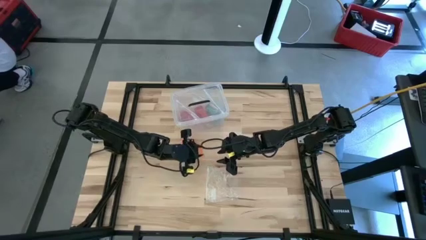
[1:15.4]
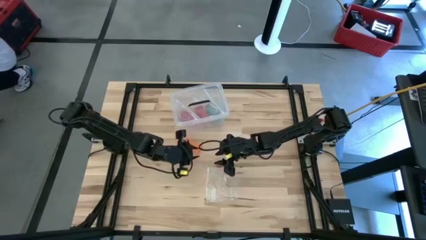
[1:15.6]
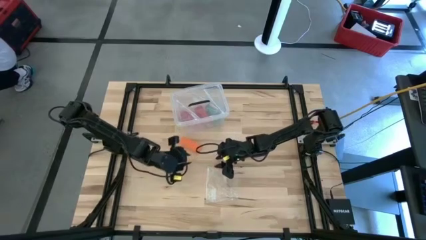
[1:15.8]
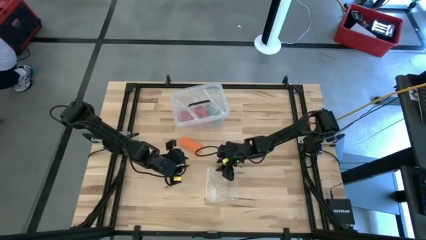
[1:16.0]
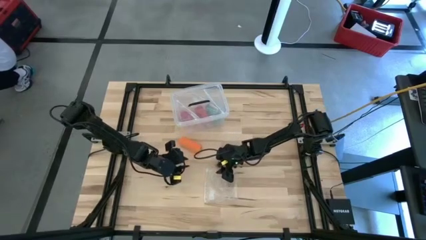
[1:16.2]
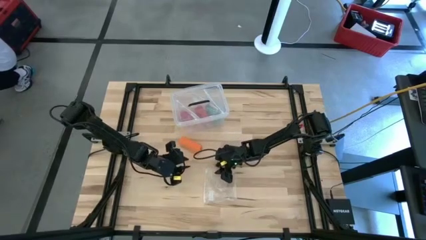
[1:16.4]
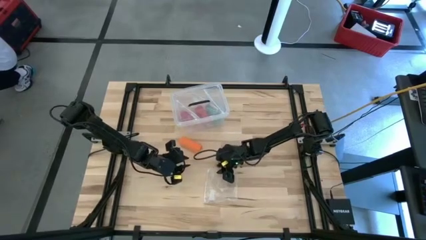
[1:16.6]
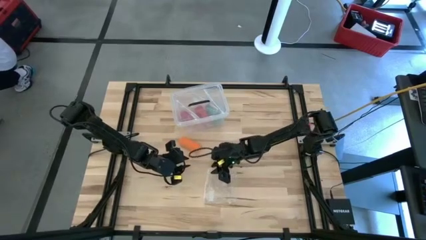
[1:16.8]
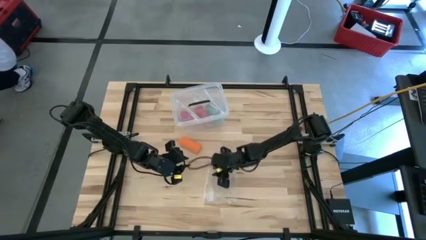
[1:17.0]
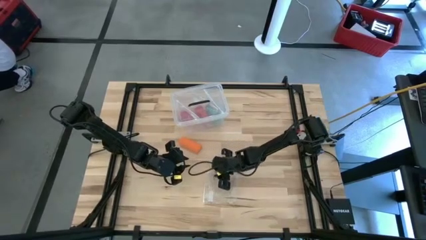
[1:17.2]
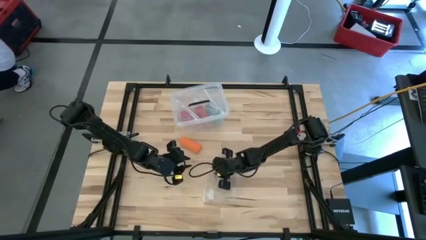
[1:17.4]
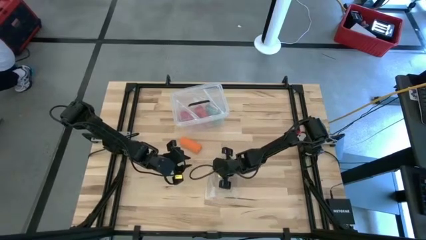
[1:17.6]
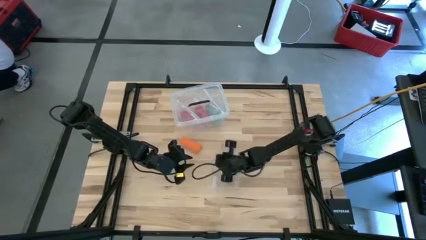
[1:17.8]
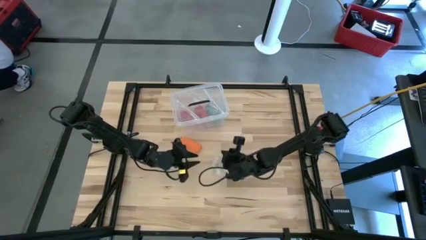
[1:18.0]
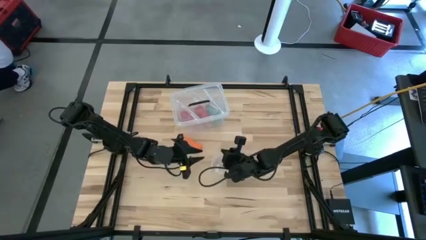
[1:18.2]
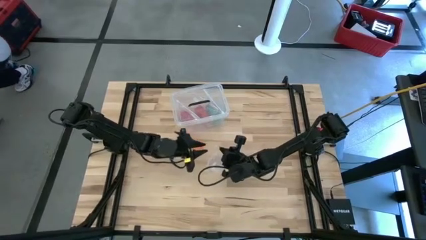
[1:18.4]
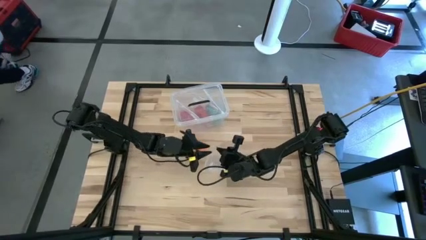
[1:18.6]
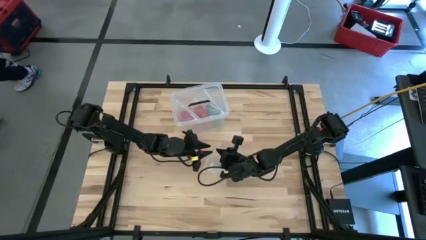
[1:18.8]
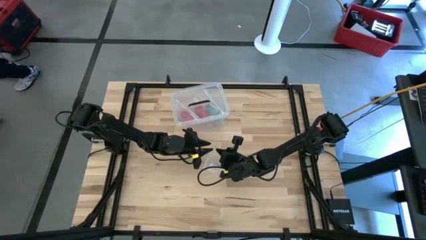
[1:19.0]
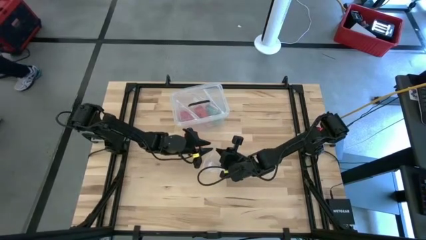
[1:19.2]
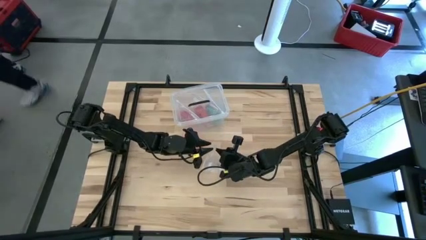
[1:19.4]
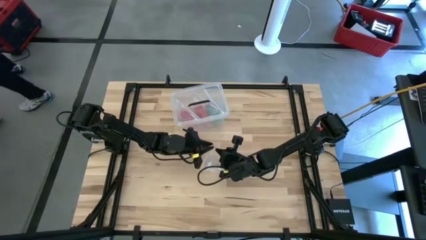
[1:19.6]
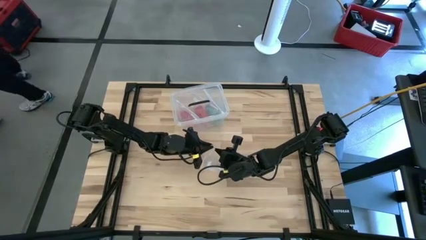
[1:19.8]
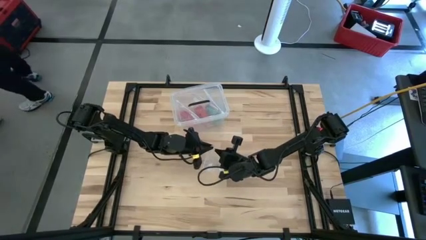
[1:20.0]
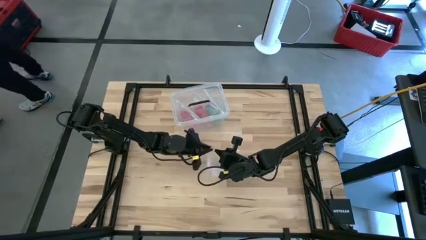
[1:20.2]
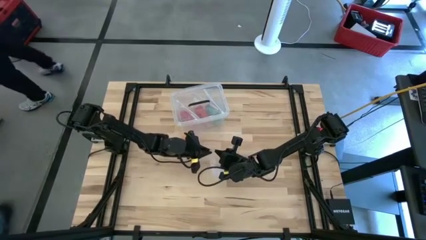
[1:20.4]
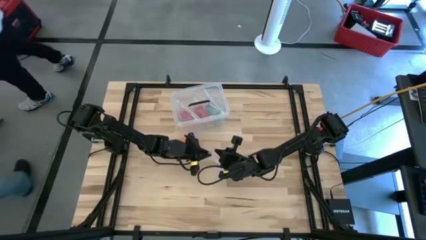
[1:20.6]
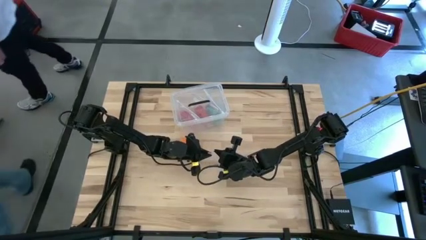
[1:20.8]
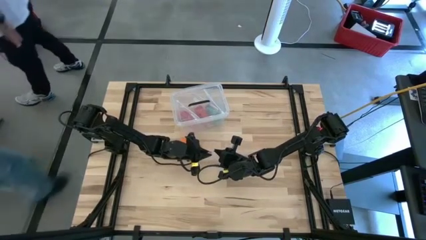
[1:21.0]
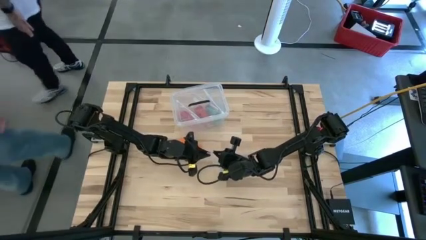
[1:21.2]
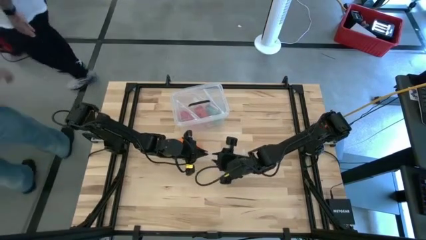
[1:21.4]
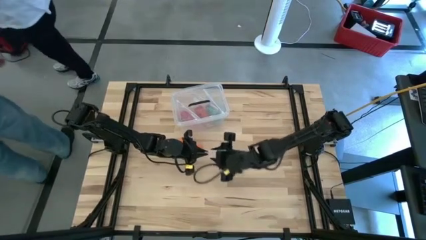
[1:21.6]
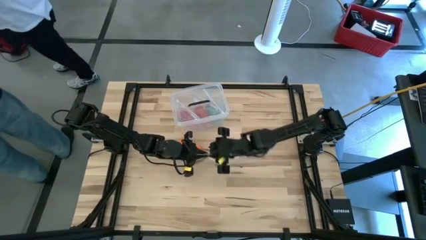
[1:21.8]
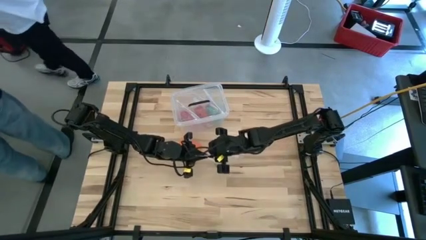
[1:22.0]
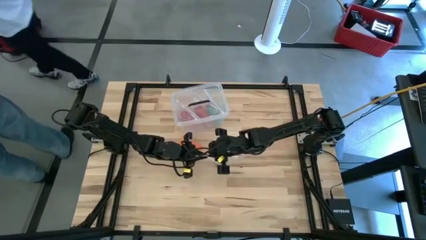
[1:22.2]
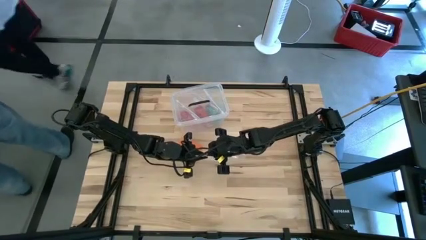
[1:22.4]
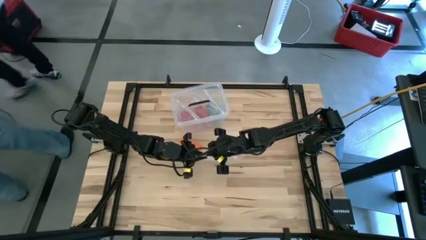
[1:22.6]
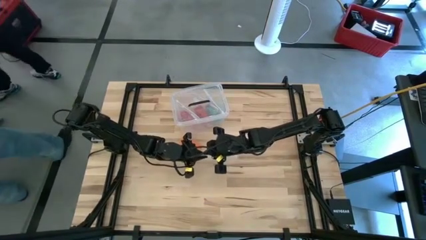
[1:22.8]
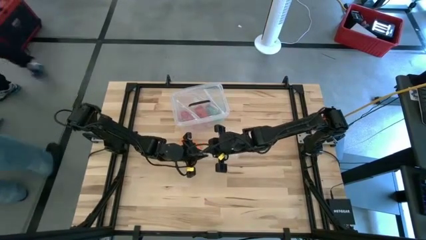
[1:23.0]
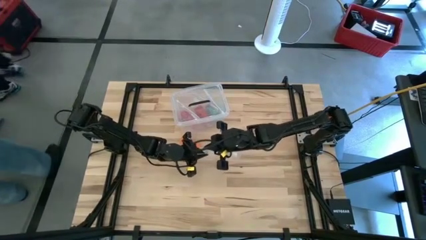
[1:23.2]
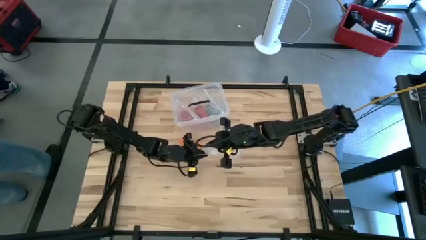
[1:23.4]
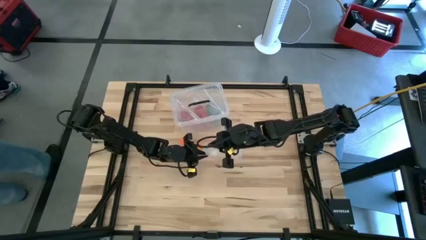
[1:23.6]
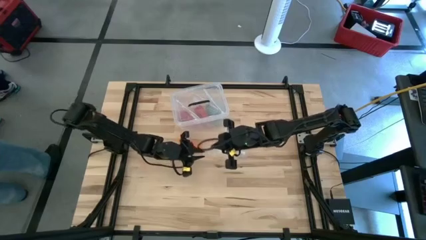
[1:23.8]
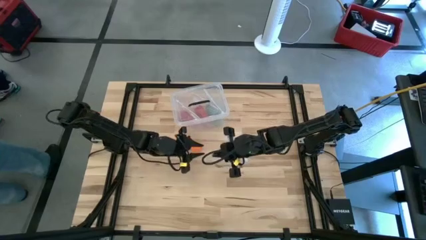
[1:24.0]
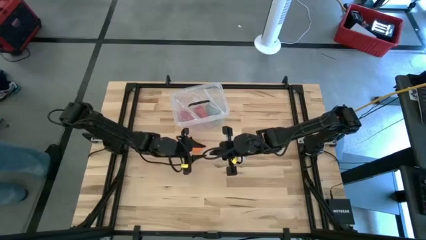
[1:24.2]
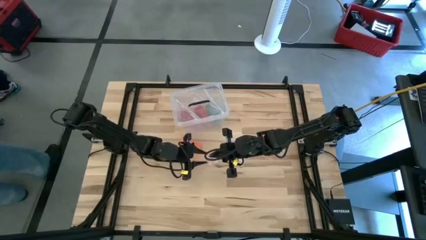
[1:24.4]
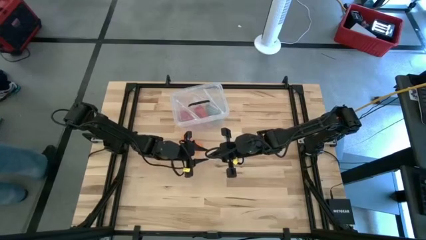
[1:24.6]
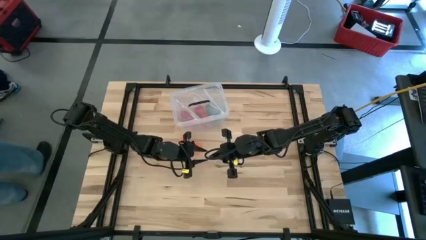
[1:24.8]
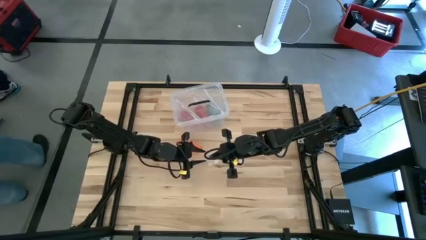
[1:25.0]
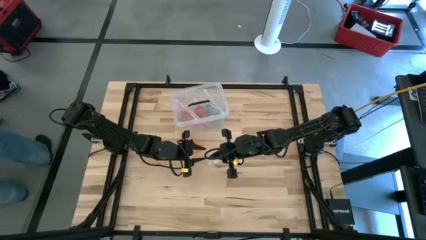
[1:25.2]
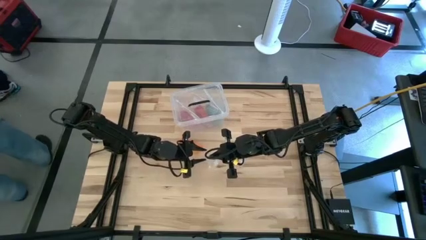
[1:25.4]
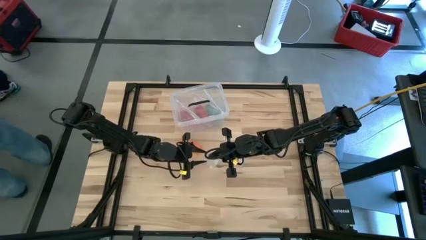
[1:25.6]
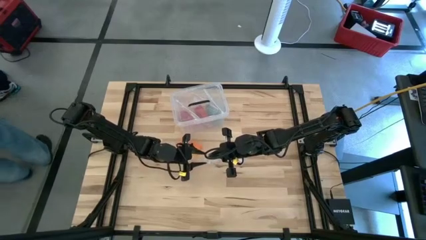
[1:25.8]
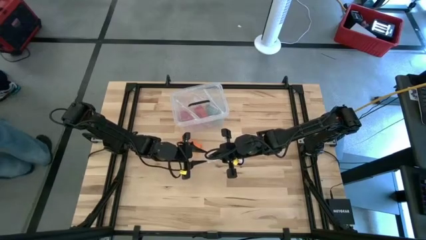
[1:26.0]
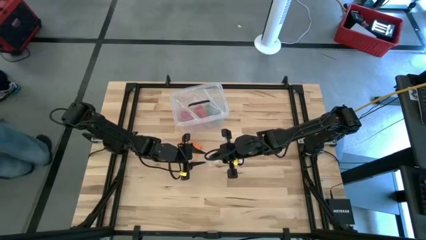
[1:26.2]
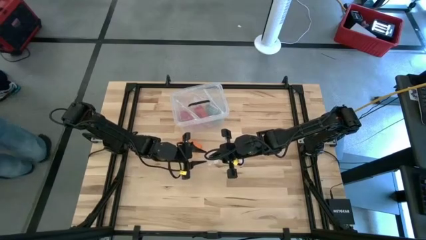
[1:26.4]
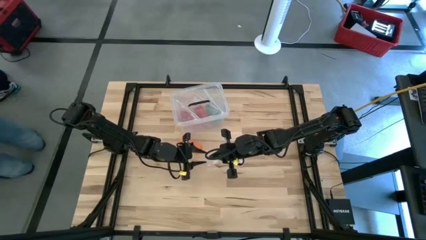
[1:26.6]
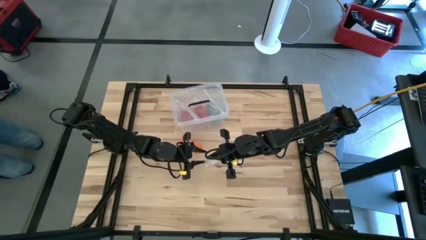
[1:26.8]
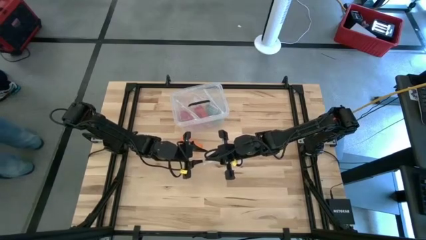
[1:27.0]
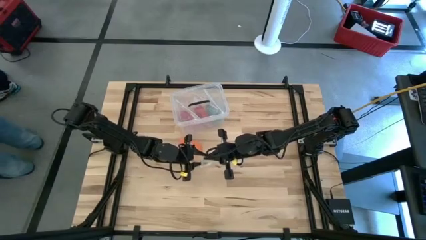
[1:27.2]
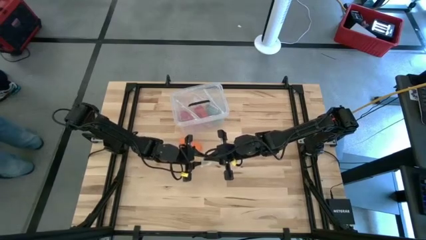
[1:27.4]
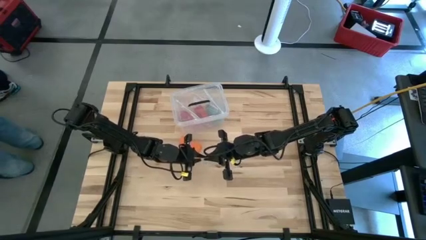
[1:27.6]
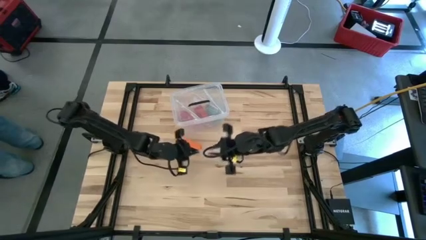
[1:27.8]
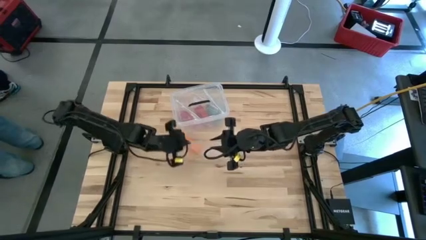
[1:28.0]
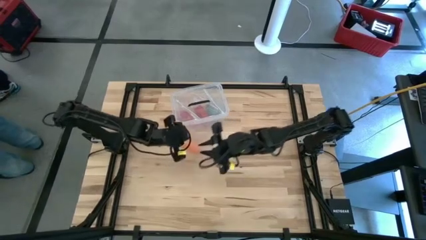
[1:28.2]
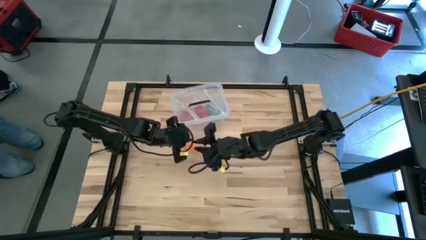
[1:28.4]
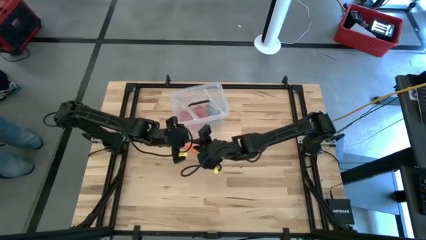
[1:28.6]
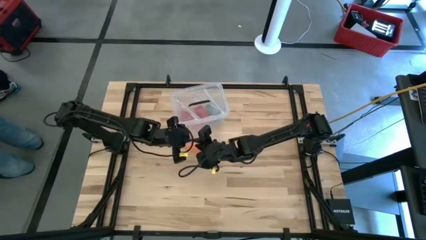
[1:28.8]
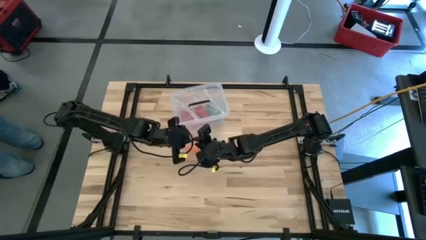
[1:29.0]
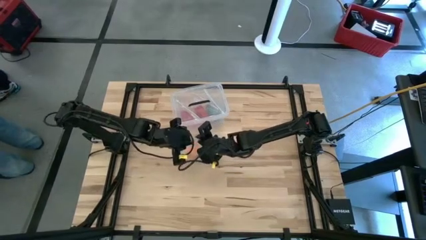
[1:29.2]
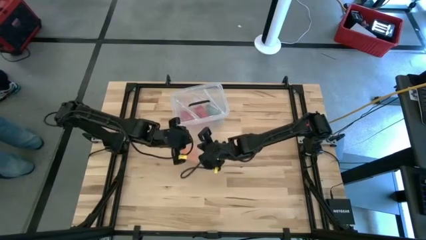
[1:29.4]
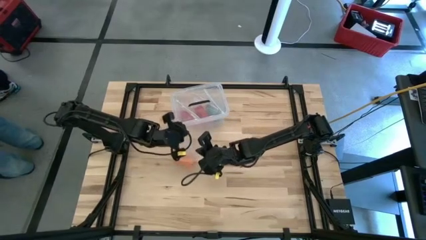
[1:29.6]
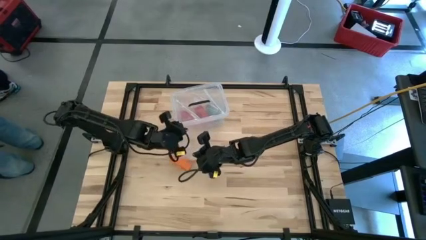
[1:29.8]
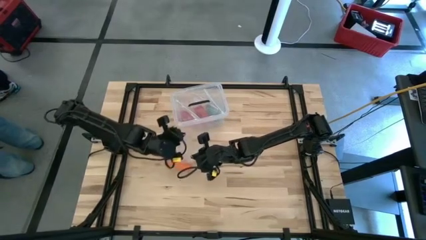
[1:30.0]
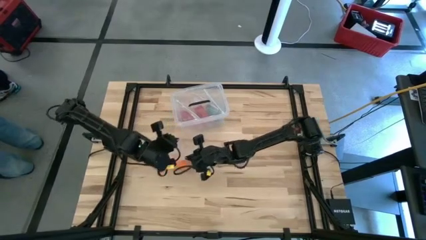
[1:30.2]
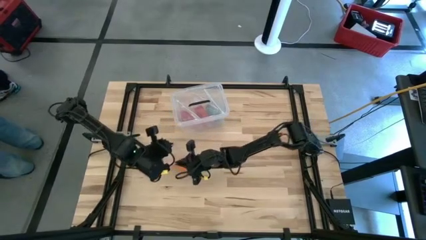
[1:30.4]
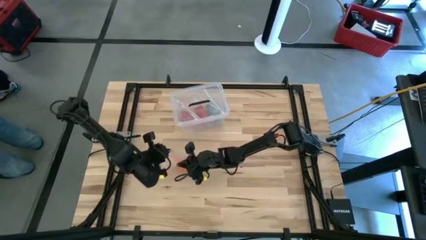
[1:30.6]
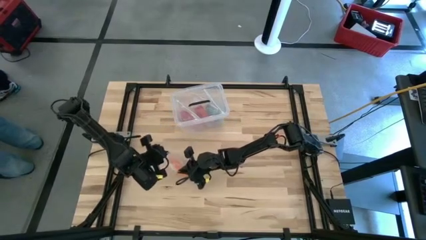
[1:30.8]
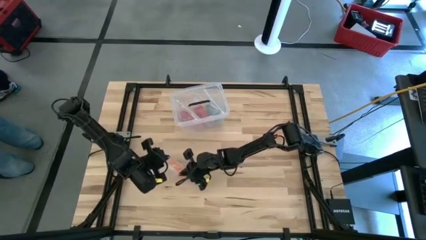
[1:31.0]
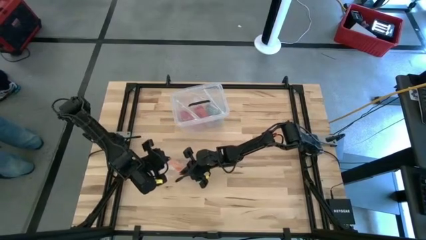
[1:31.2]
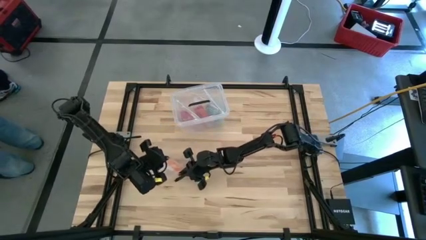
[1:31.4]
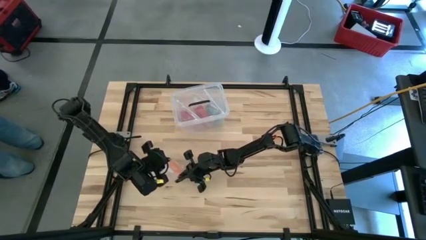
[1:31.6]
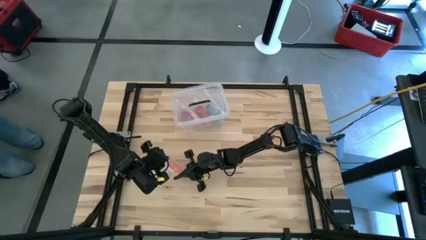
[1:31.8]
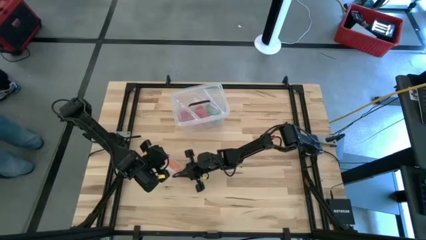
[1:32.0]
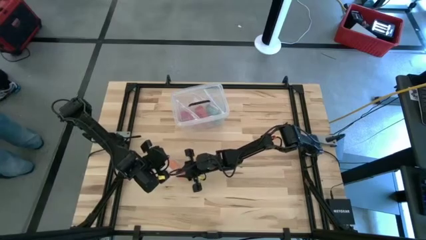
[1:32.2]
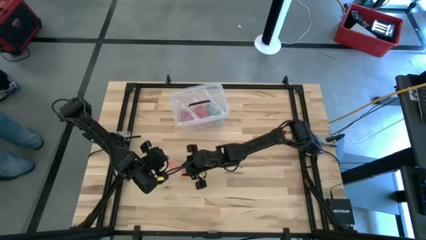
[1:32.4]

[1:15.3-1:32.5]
Task: Roll bandage
Open the transparent zip bag
